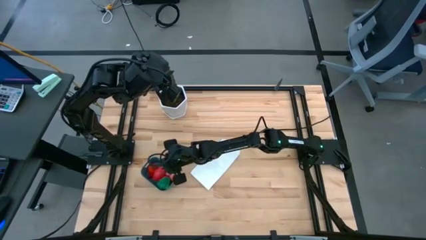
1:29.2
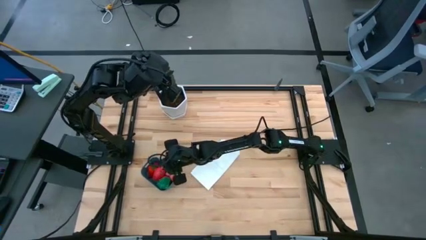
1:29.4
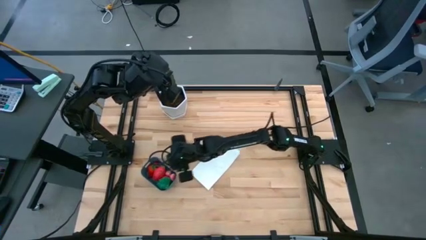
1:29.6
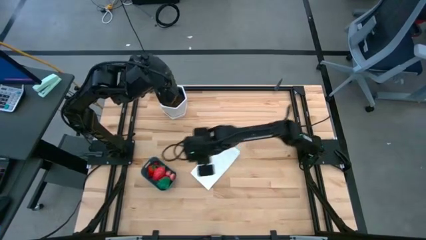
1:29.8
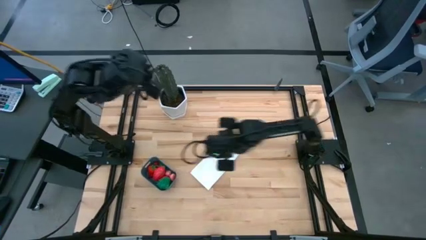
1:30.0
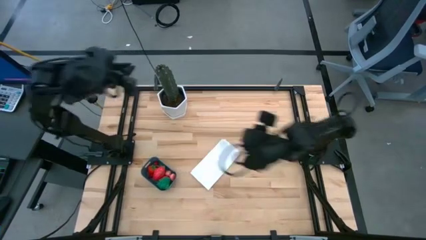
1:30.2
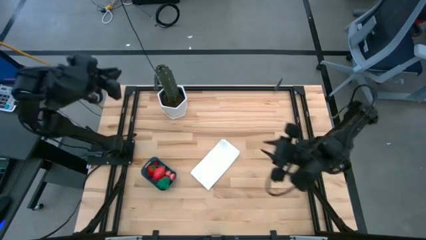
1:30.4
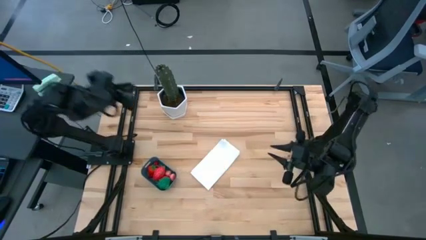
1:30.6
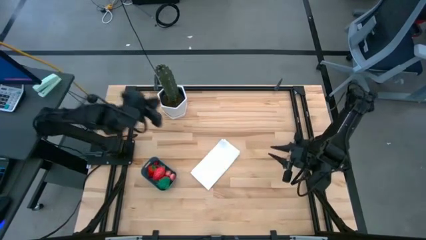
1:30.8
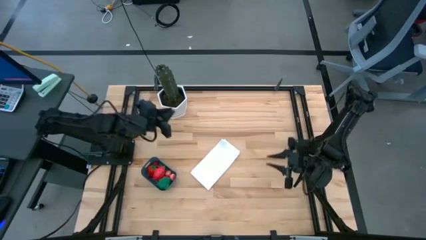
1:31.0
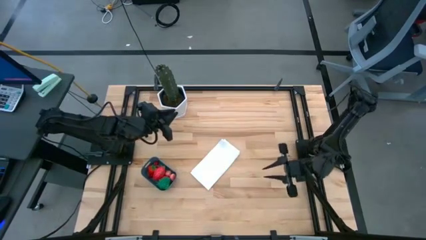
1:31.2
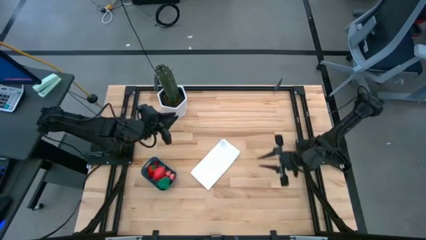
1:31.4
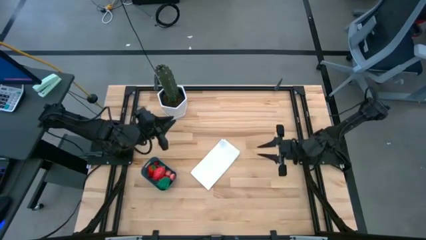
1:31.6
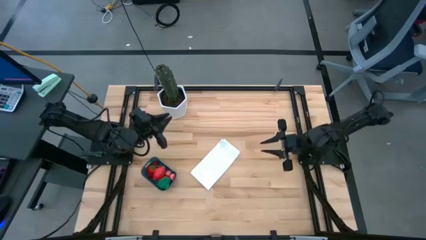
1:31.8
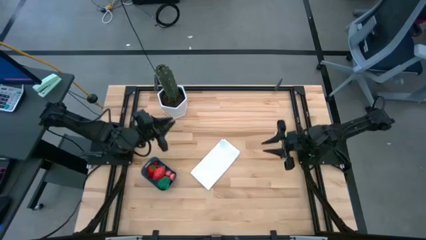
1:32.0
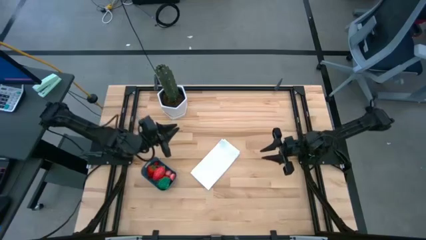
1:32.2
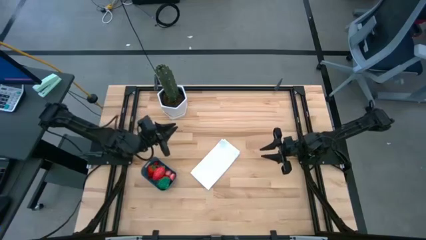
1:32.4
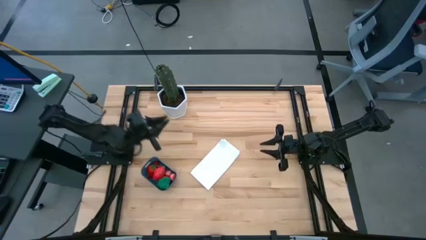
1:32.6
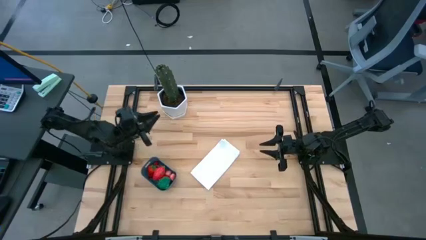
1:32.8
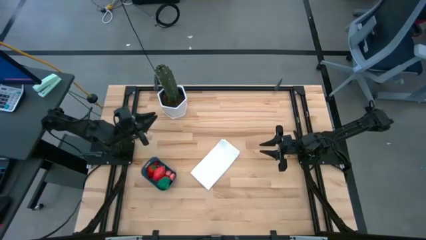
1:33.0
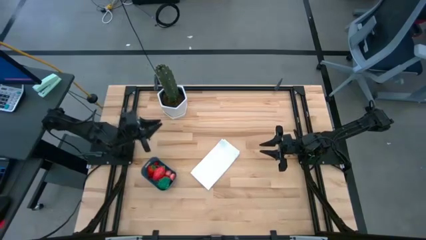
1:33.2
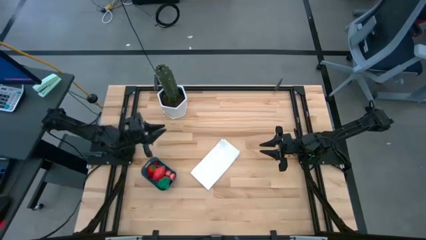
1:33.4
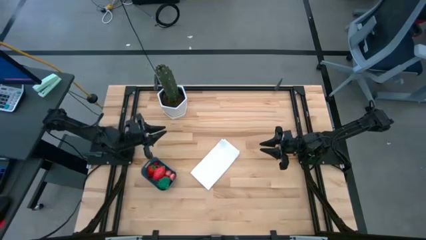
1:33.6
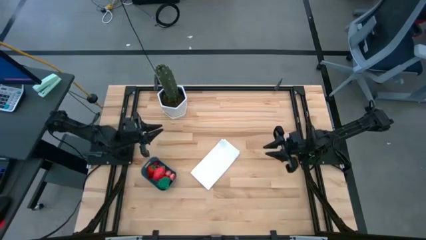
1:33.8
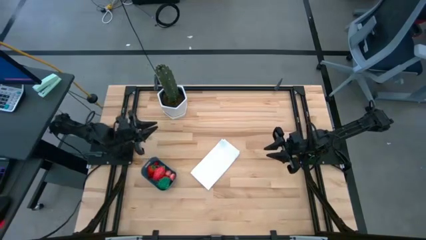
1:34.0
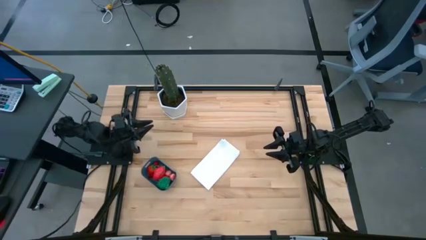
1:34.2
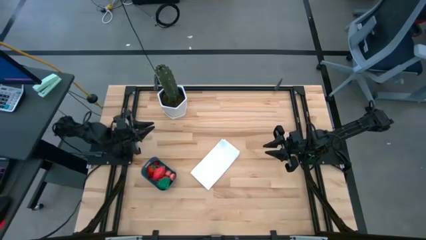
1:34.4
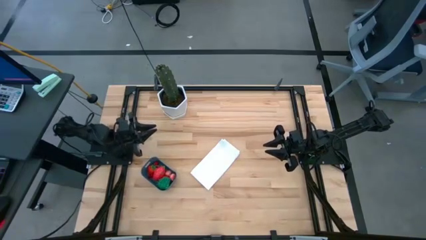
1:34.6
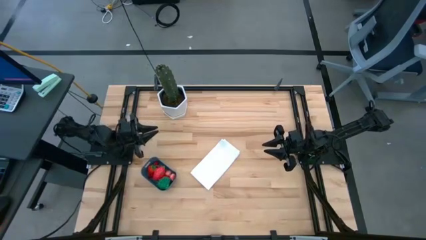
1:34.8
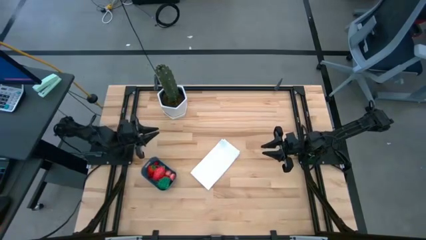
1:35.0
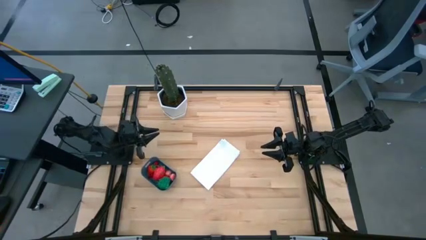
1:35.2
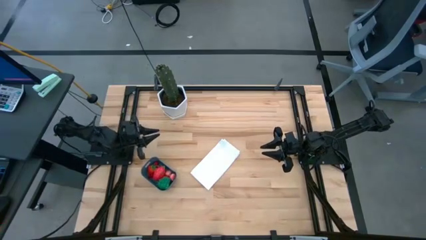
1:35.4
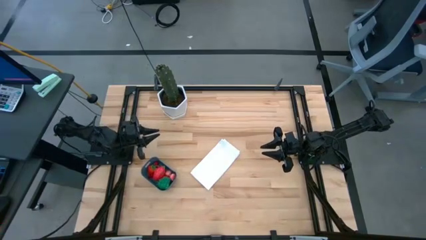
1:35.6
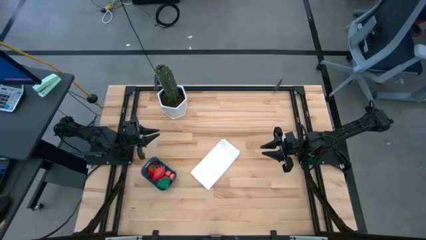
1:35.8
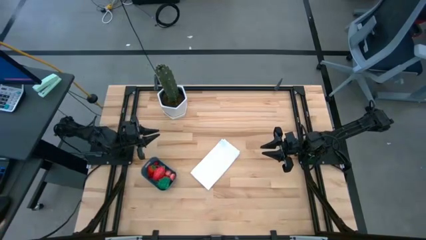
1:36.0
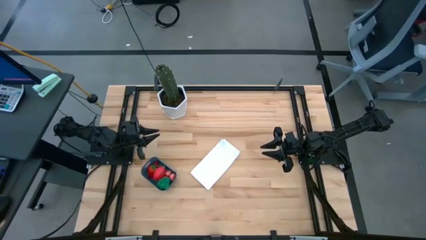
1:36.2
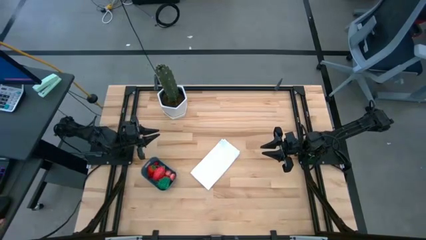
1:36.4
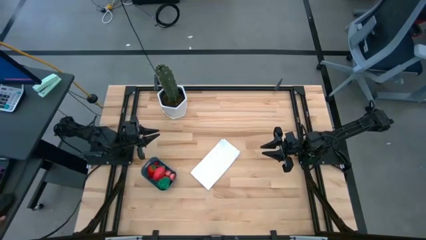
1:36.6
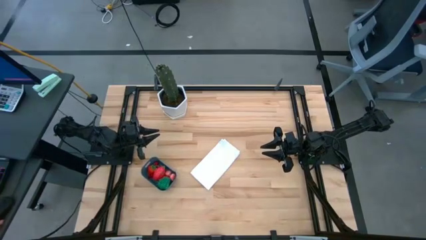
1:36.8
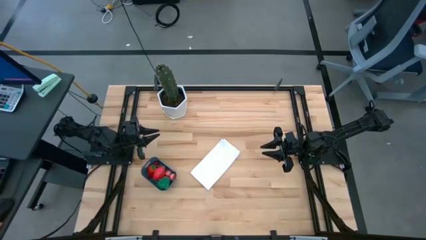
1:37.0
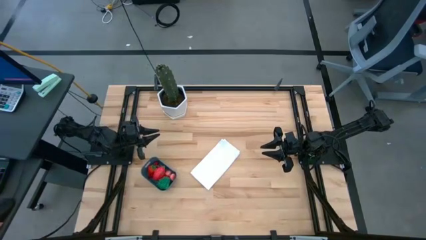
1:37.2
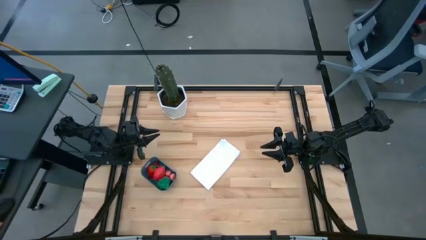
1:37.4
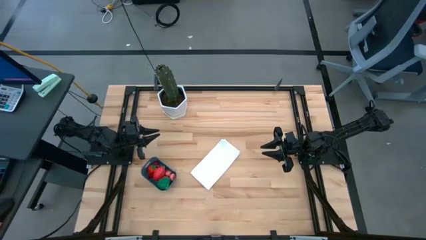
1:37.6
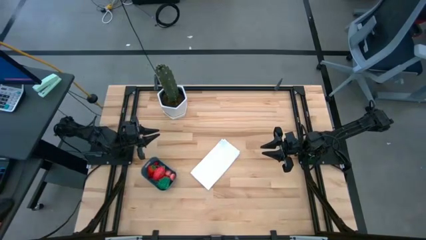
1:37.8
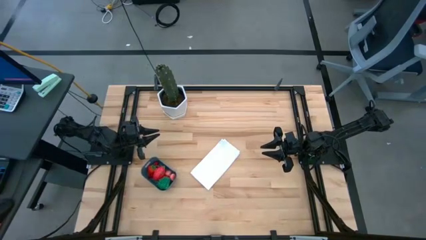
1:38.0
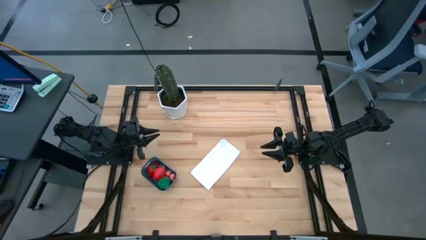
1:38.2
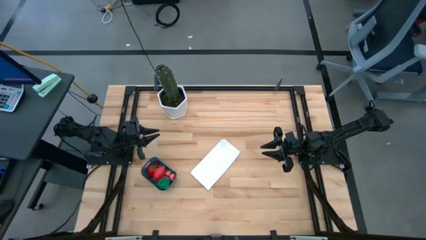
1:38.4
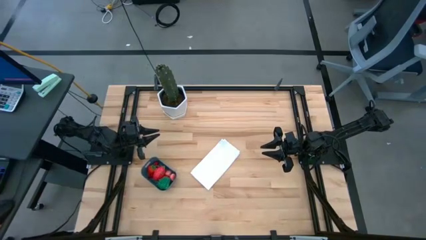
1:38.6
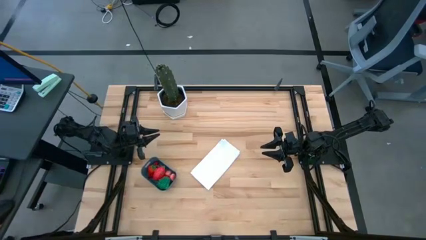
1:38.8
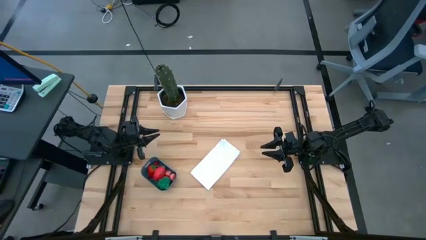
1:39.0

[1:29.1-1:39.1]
Task: Pick and placing Produce into tupperware
Return to Home Position

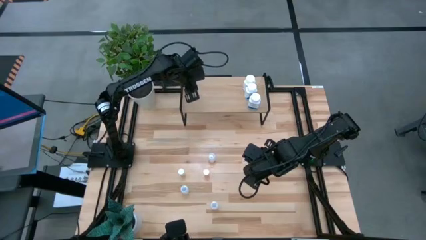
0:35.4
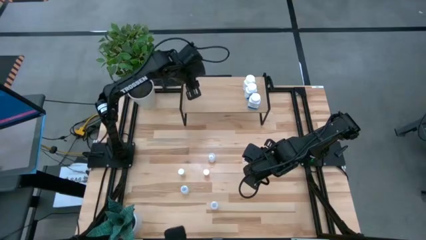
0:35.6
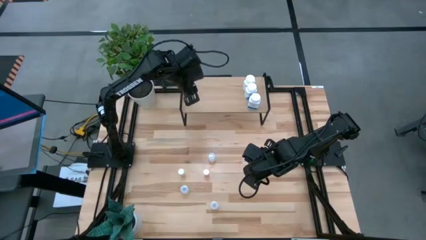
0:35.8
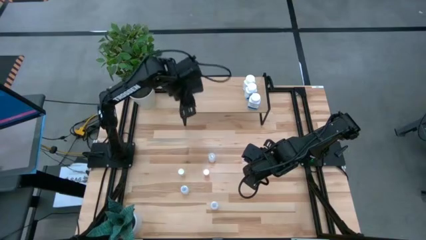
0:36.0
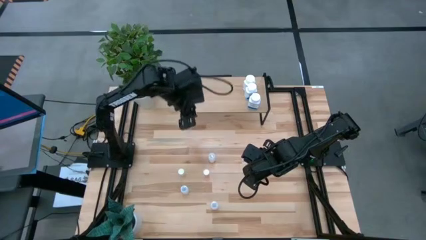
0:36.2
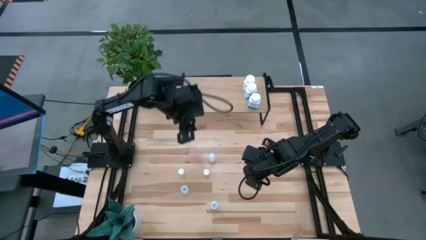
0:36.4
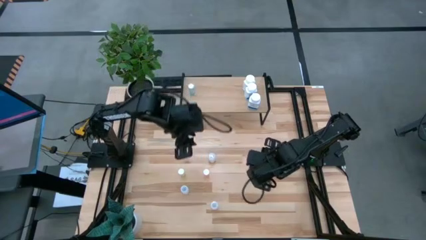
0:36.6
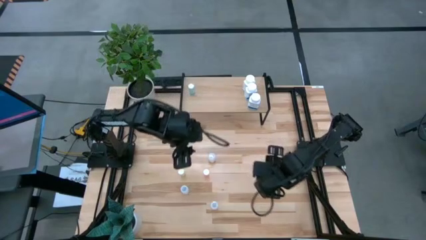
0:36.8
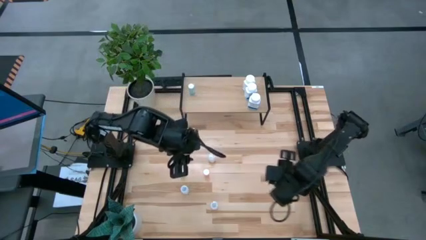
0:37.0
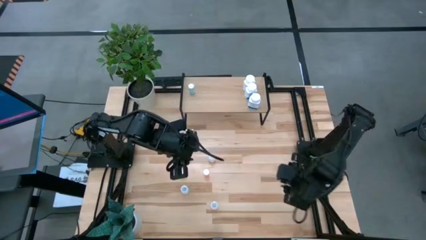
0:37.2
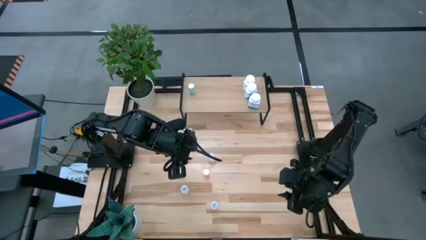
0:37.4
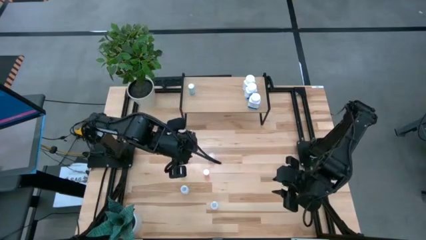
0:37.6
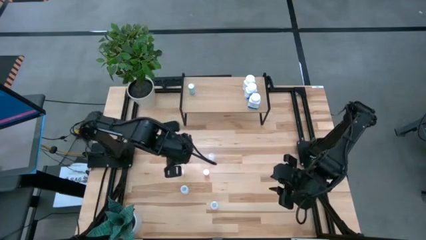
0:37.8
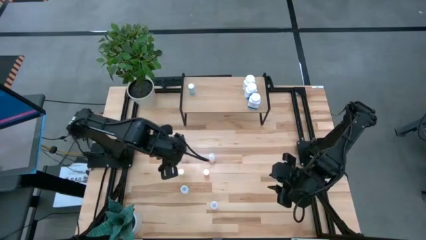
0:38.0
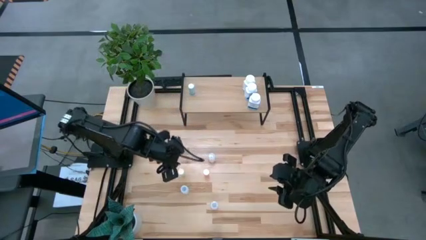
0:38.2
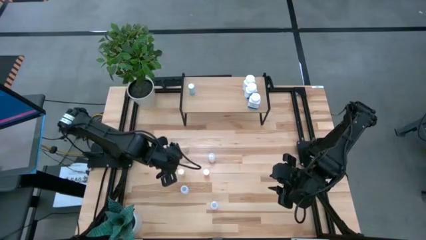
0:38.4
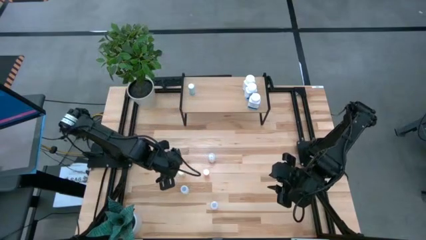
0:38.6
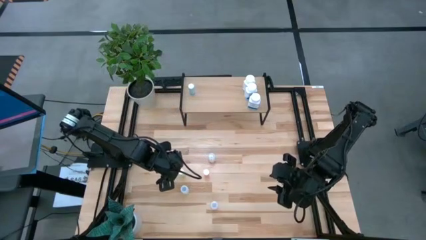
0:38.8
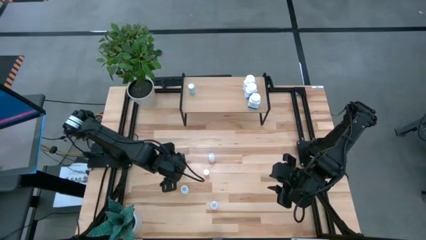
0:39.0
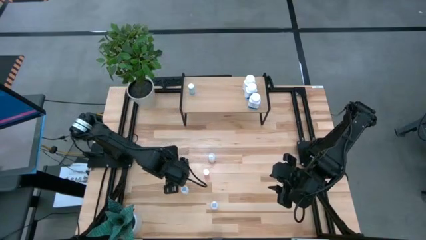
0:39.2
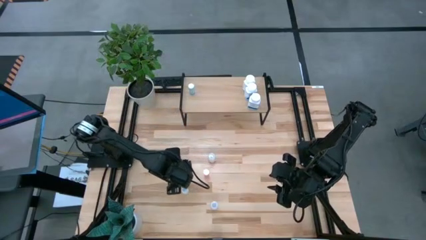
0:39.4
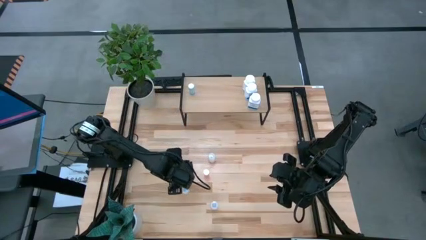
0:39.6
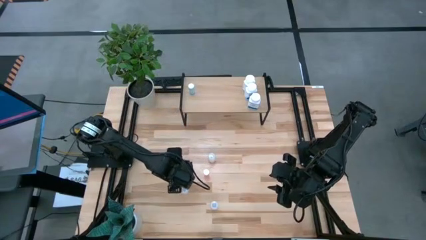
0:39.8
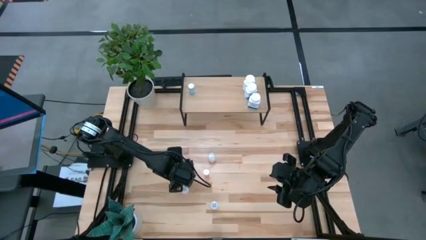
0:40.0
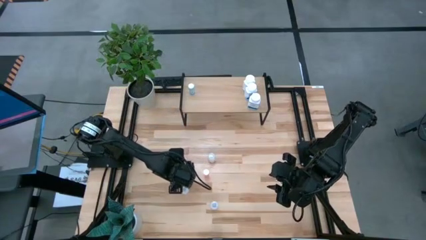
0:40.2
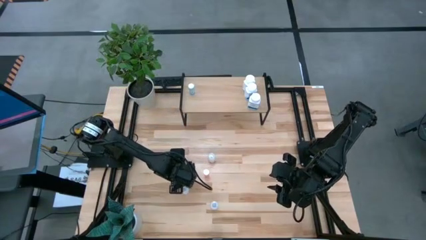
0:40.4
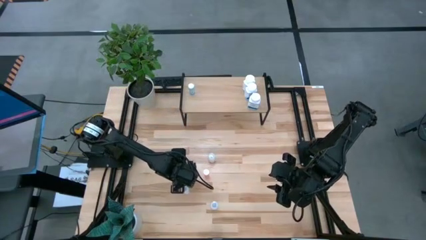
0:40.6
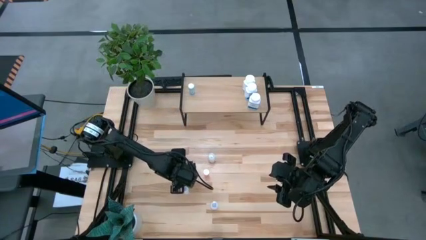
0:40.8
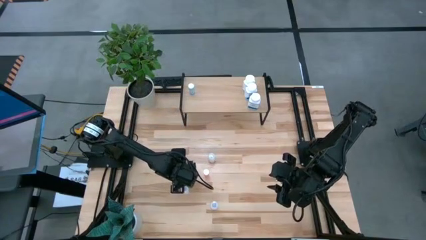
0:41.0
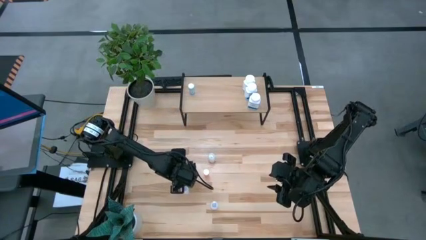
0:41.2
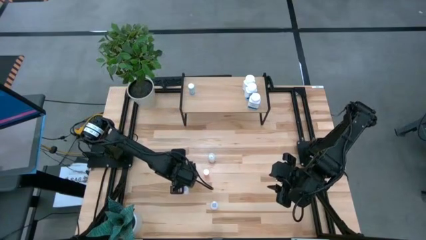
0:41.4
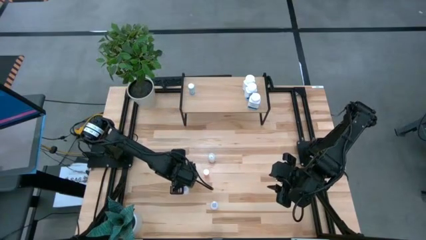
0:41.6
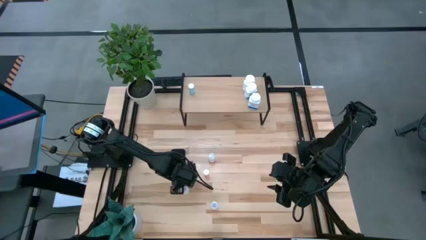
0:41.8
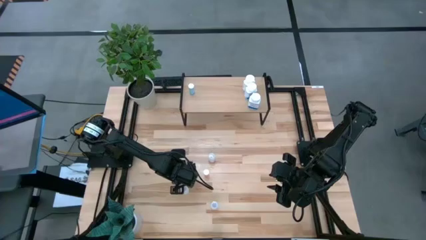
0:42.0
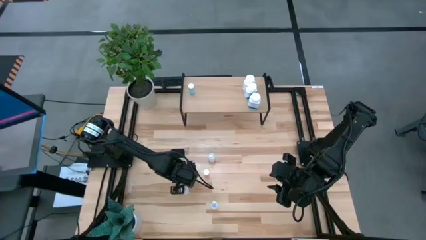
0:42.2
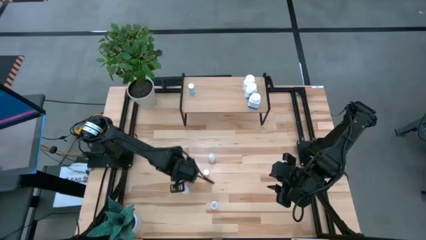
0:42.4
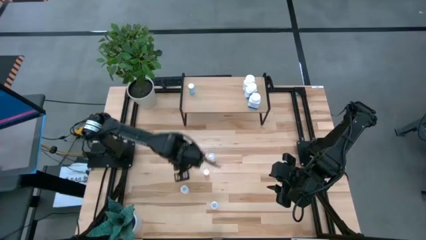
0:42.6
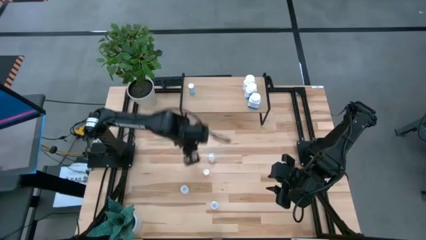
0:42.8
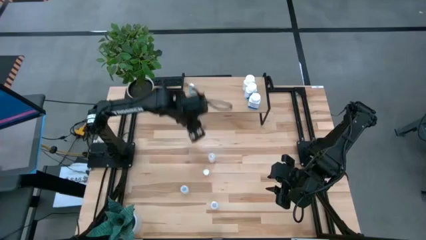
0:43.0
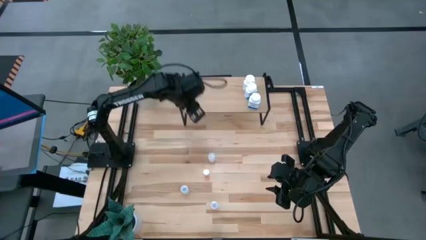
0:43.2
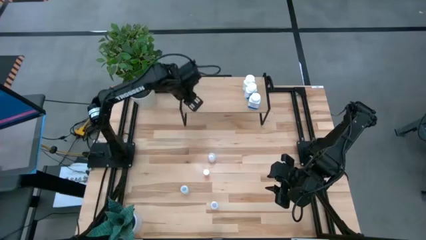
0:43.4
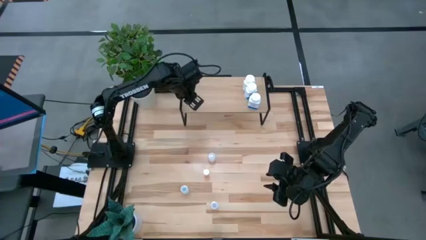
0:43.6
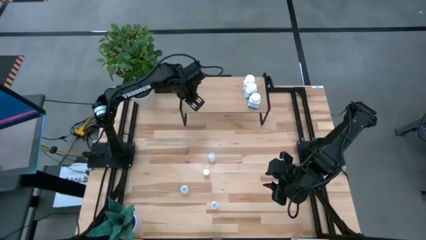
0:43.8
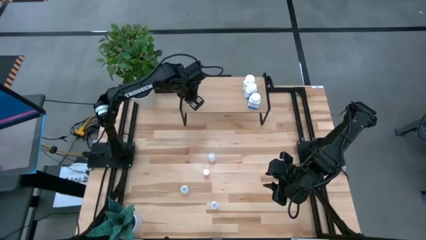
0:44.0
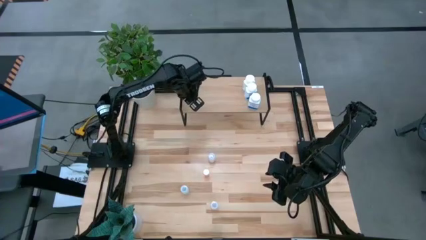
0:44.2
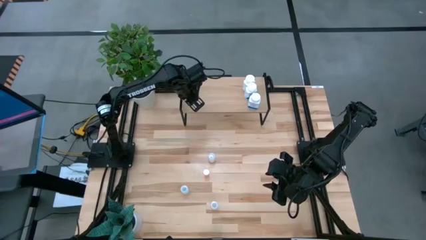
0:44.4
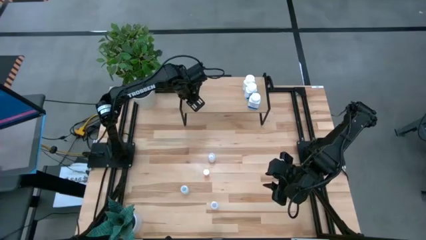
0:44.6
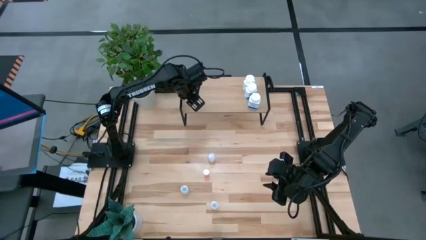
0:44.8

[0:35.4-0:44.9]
Task: Pick and place medicine bottles onto shelf by color
Put the yellow pill bottle on the shelf
